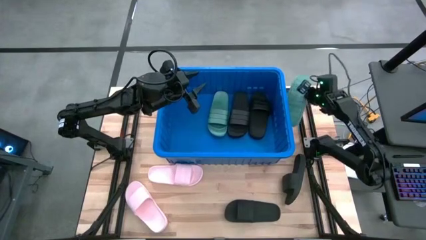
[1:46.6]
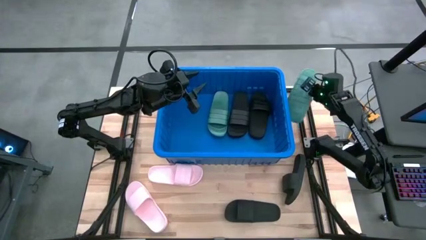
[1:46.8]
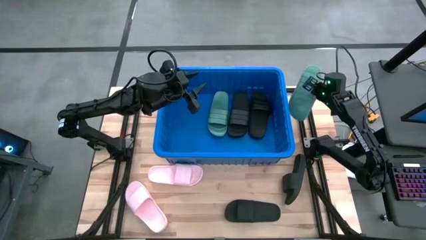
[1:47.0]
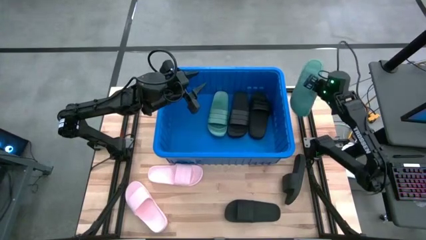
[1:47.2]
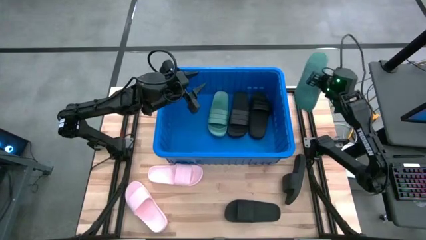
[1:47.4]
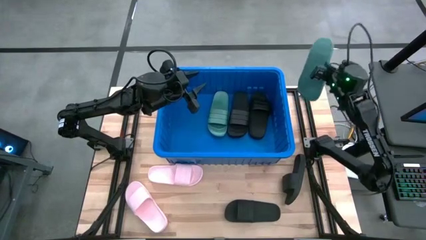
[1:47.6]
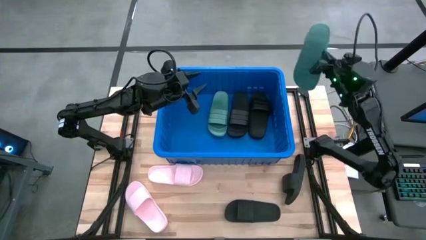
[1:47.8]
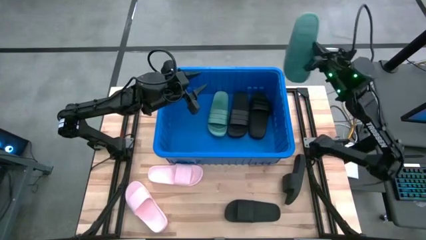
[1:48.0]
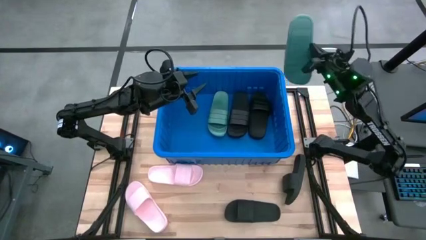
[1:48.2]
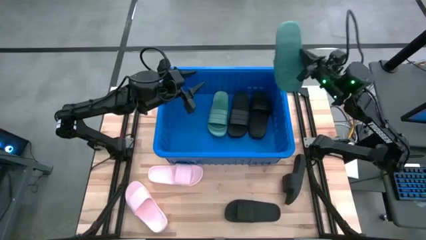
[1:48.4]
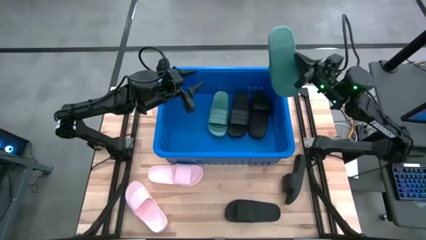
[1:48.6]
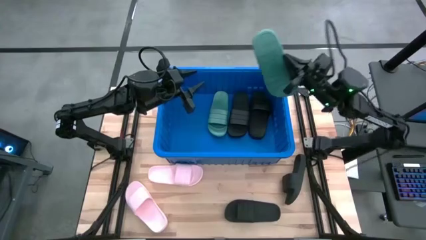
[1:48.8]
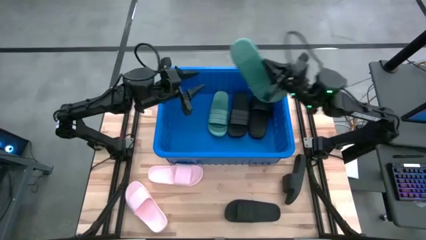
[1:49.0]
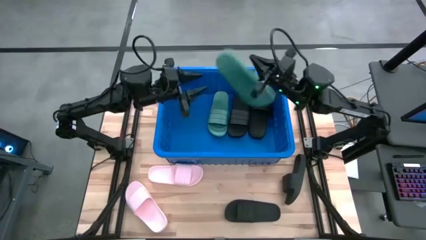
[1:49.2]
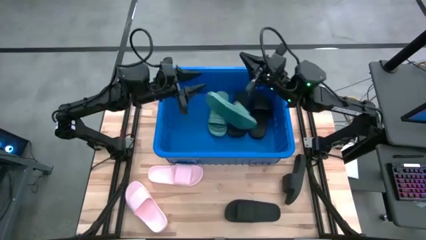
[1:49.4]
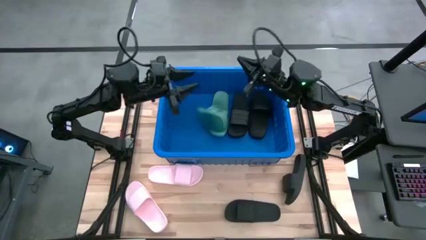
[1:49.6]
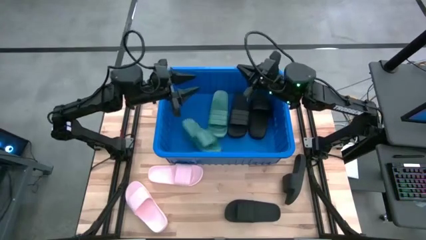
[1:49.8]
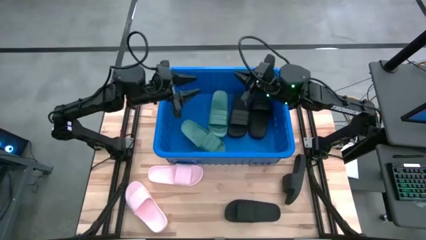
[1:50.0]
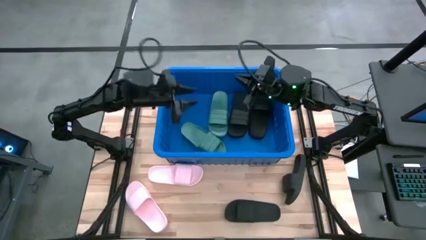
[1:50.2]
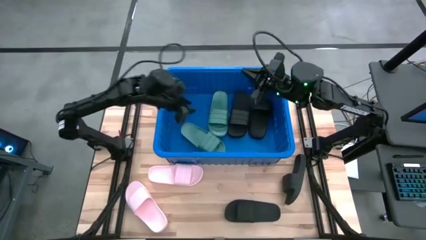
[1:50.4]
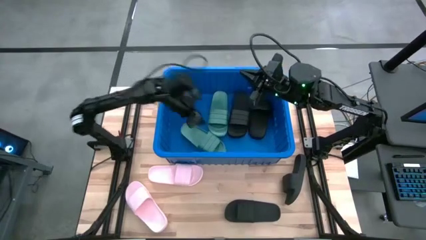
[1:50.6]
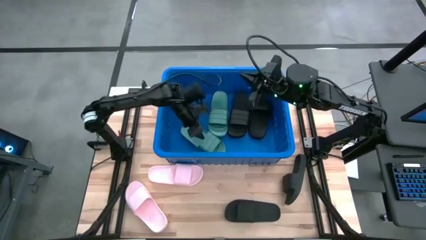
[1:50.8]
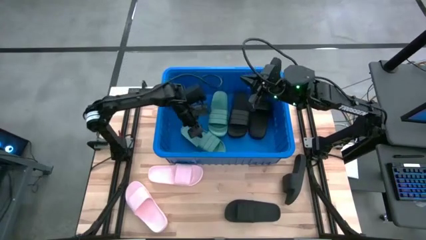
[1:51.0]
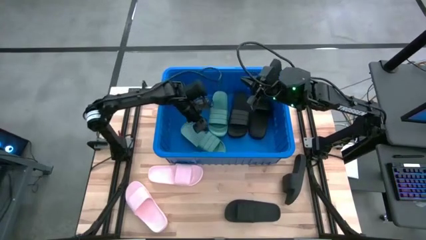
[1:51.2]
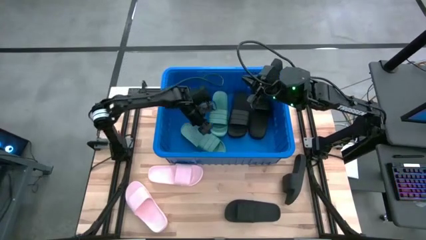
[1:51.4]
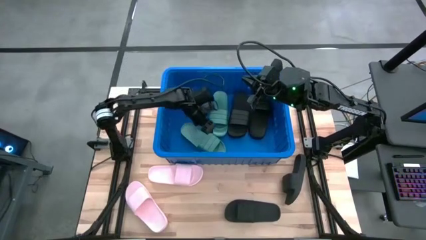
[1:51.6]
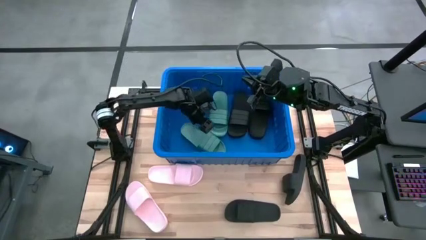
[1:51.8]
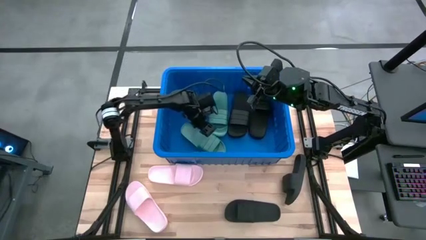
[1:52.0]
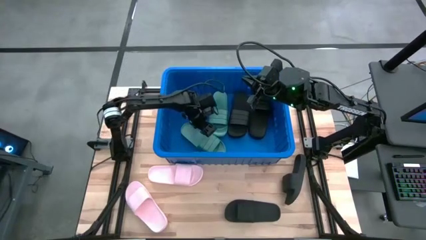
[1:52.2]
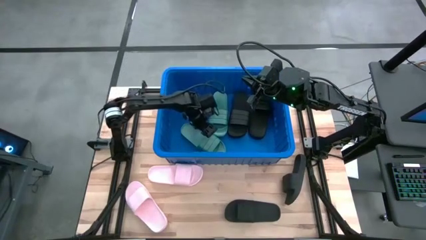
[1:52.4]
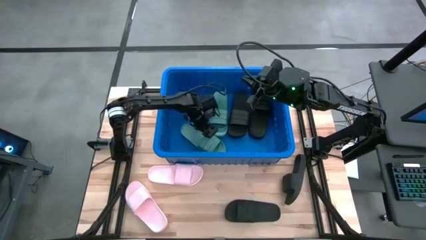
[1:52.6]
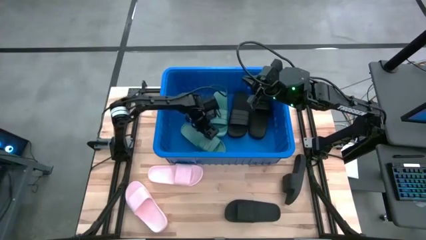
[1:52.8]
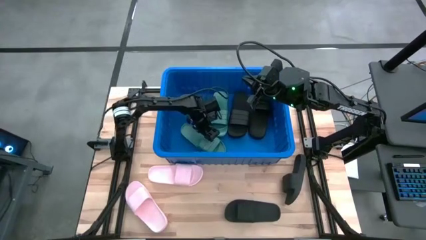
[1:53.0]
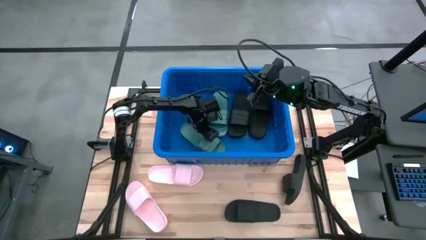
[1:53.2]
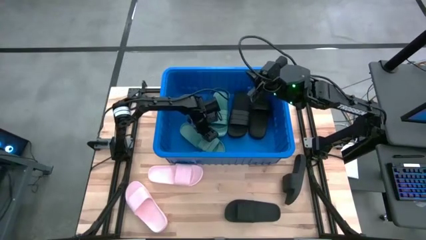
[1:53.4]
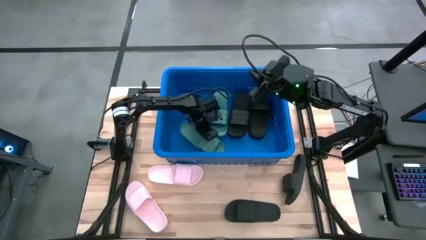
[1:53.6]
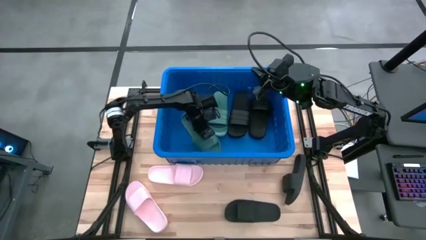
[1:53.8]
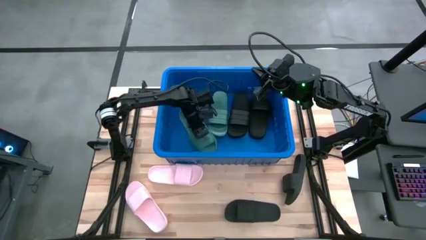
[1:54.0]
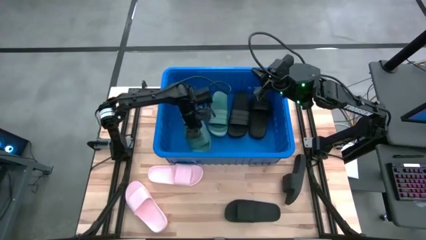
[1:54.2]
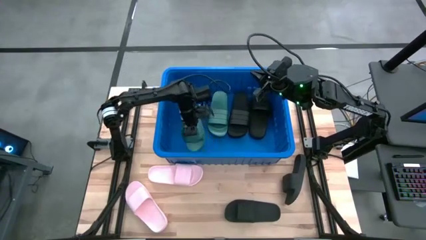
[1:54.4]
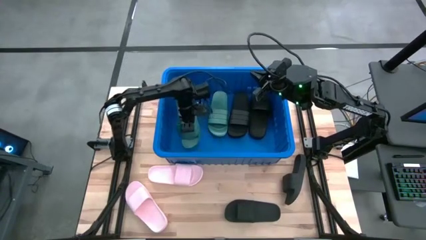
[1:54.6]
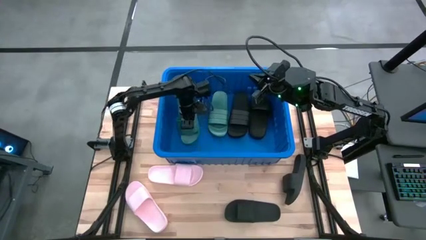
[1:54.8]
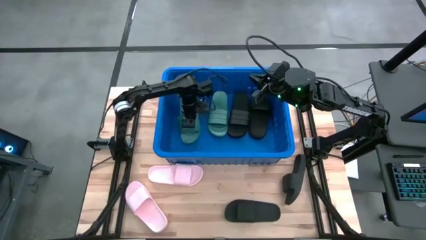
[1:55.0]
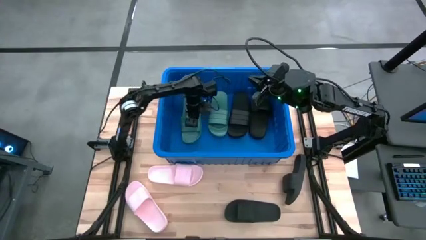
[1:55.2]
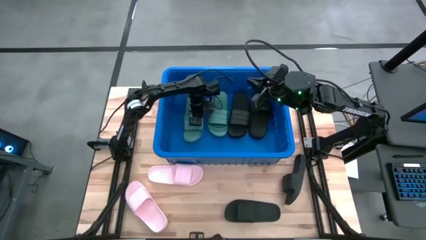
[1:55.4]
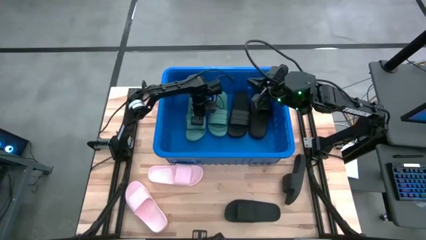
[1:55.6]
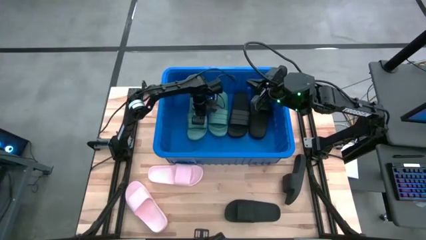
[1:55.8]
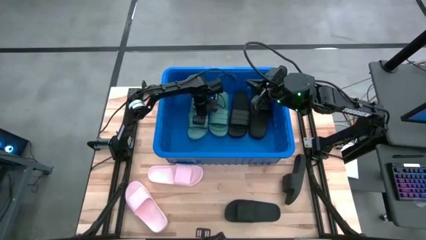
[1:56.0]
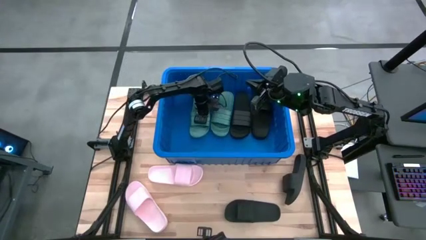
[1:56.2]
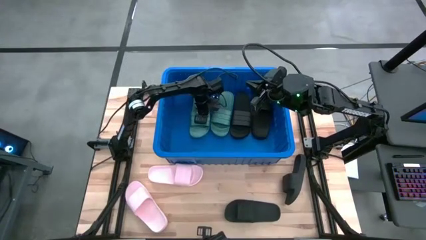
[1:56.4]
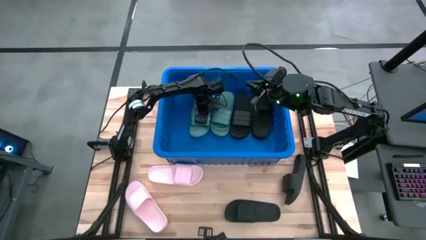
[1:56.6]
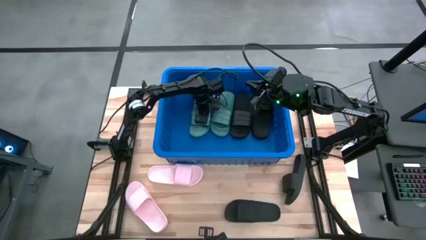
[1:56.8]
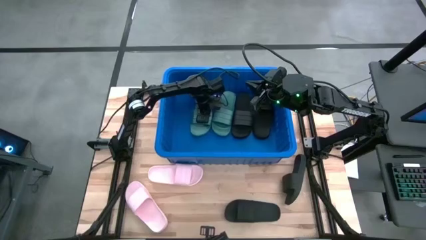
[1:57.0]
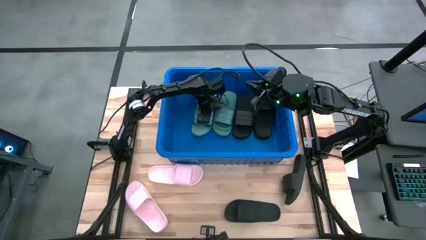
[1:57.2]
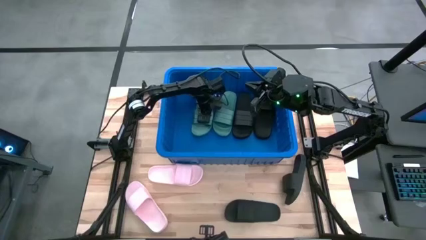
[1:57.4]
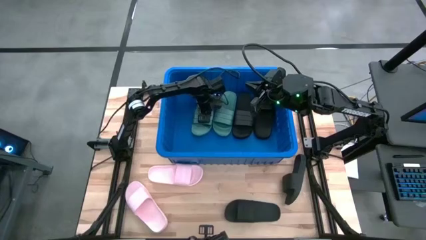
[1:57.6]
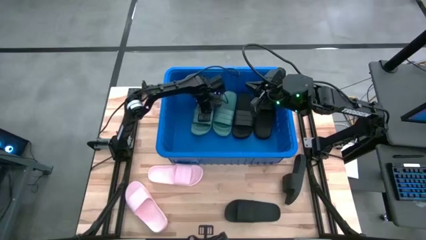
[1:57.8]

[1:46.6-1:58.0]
Task: Pick and place slides into bin
Put the green slipper into the blue bin
